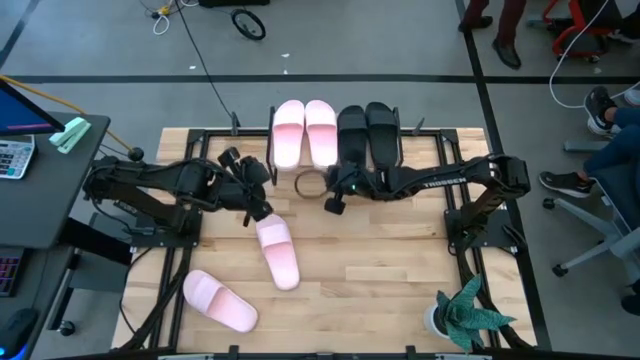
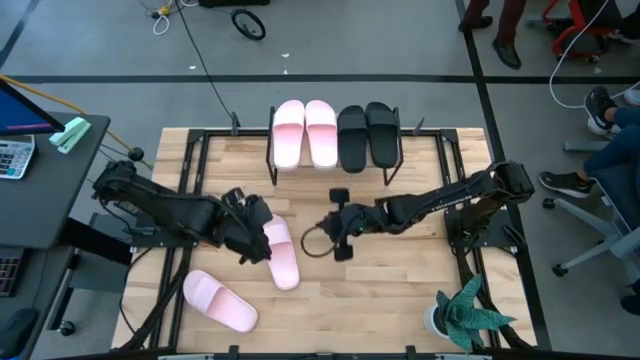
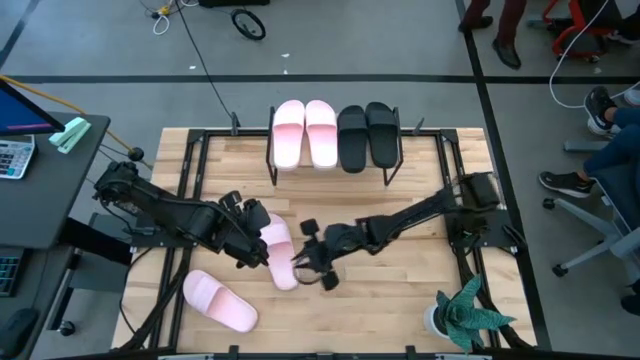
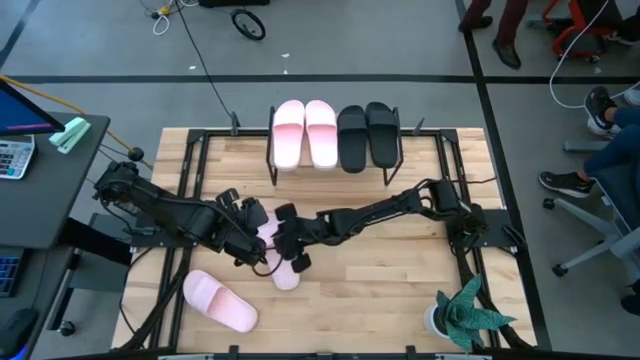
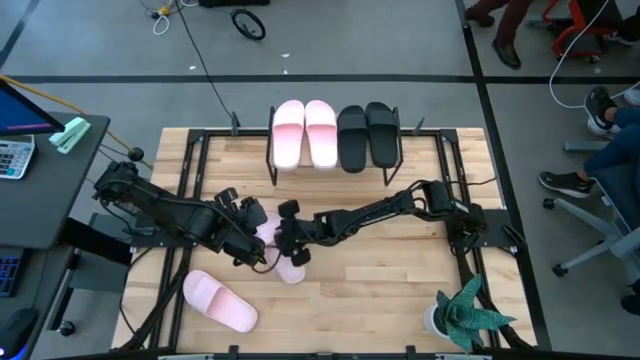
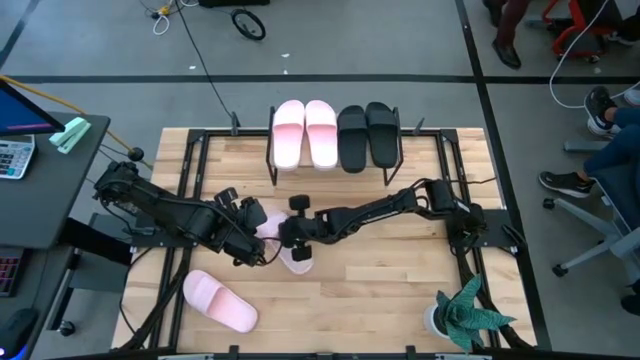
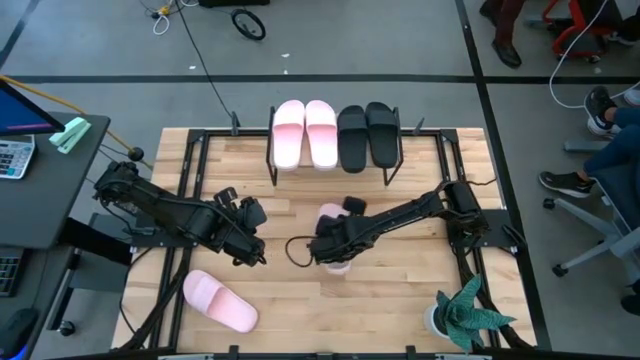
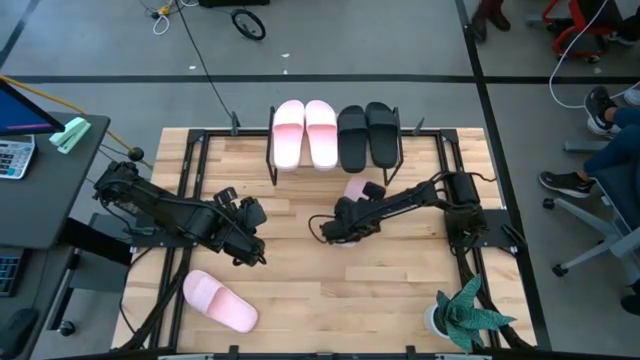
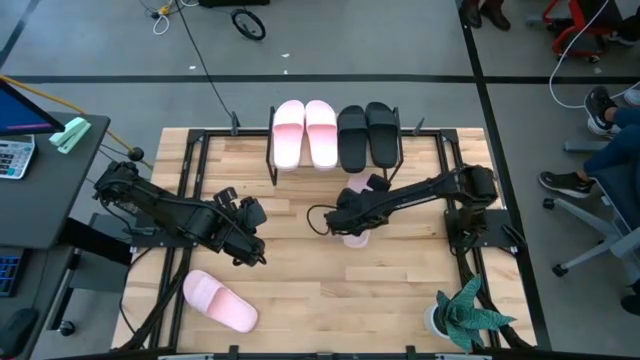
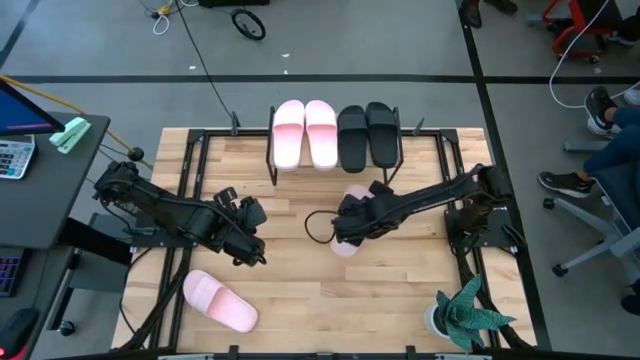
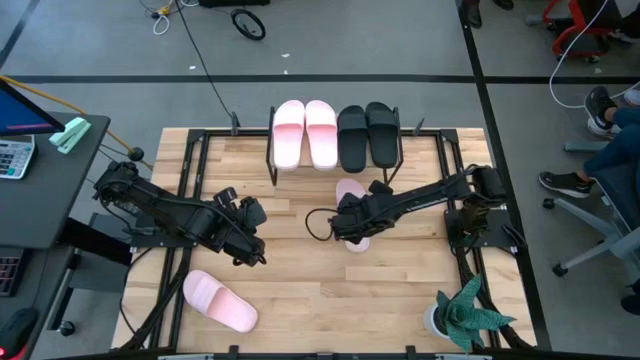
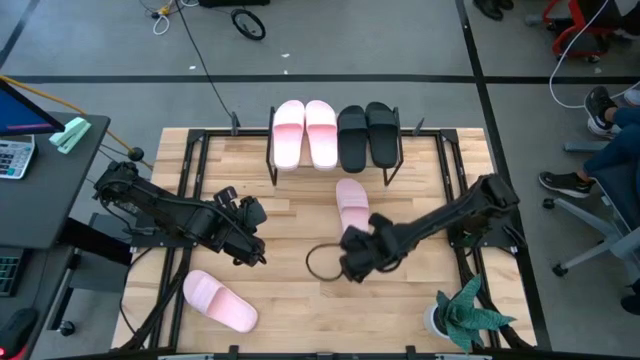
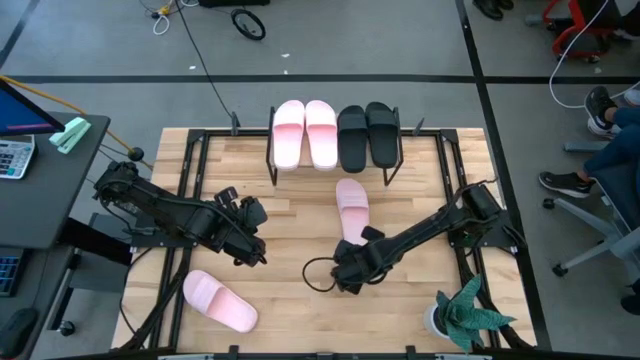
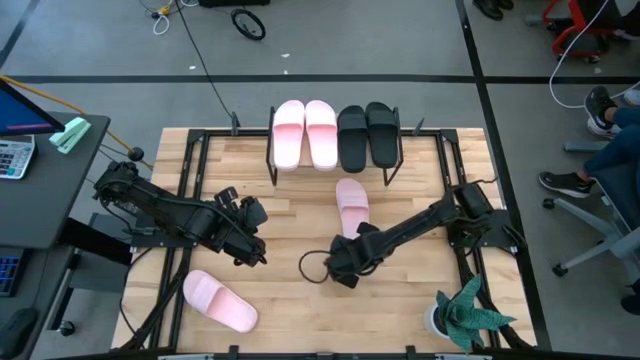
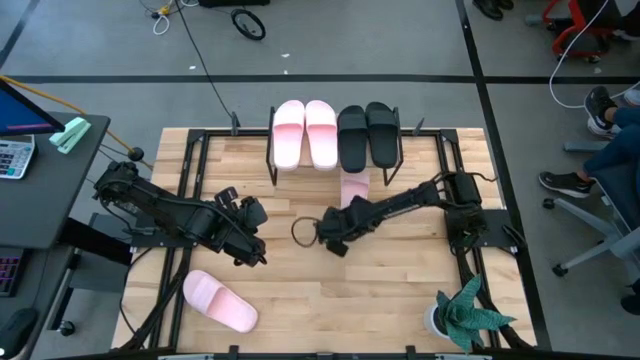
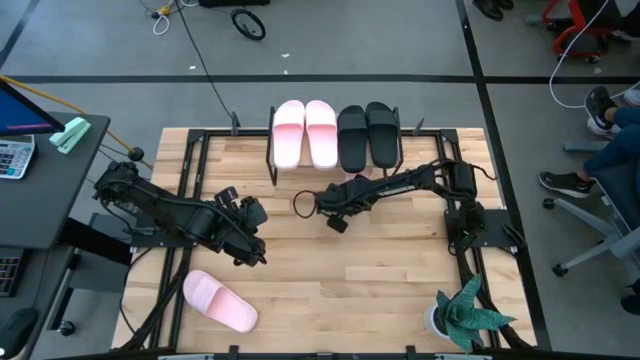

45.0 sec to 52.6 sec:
Task: Pick and place slides into the shelf
Put the top pink slide under the shelf

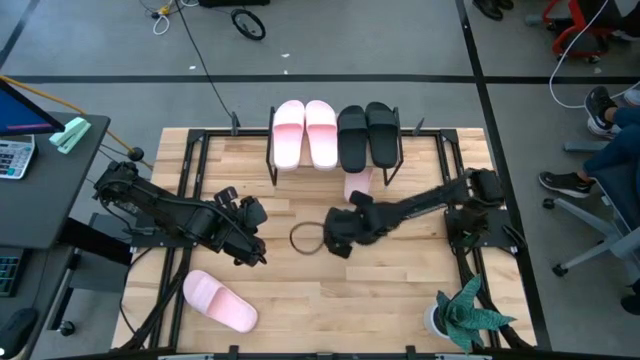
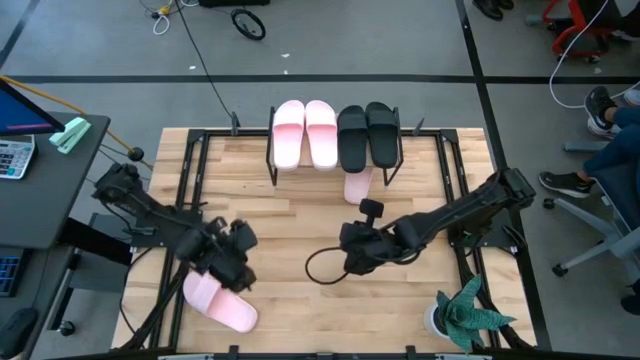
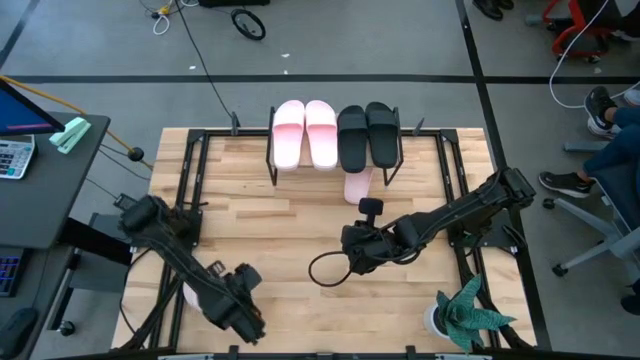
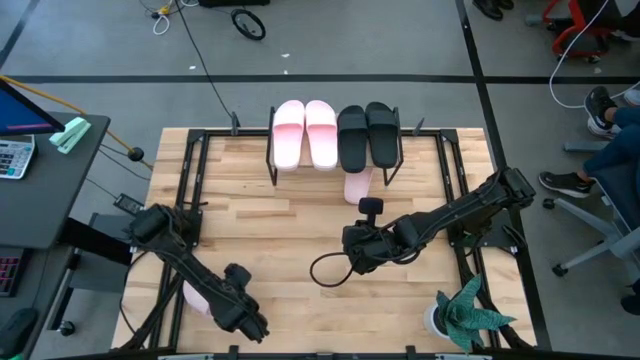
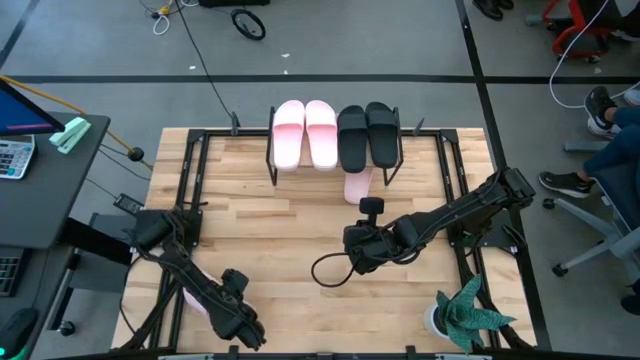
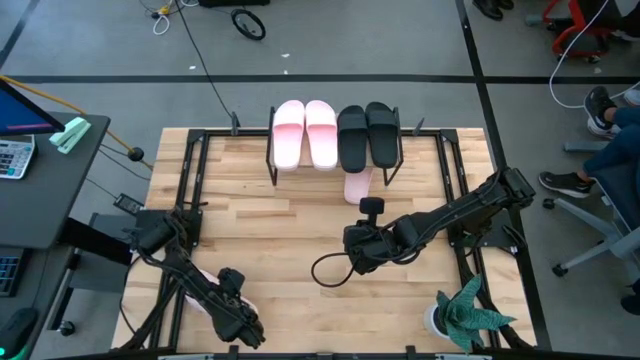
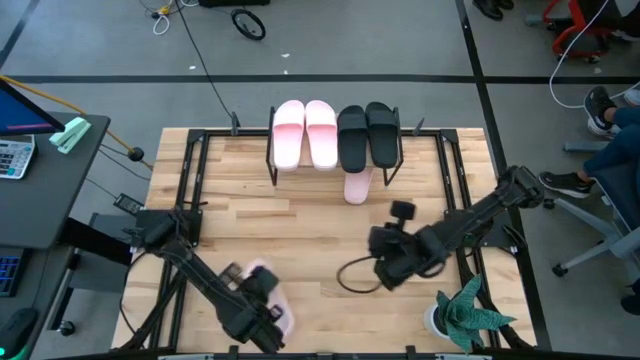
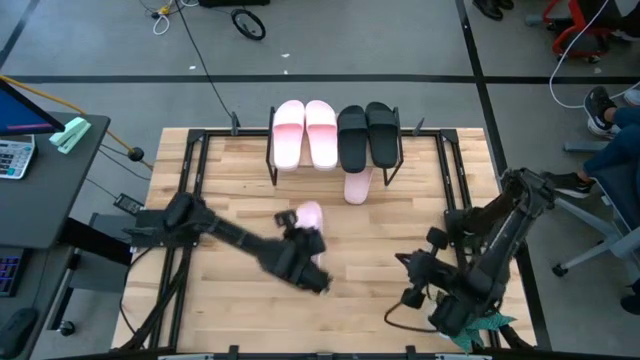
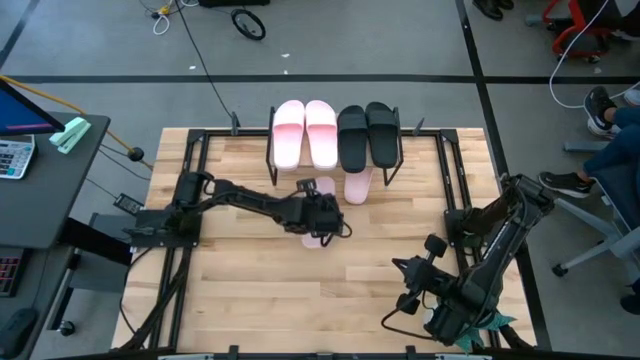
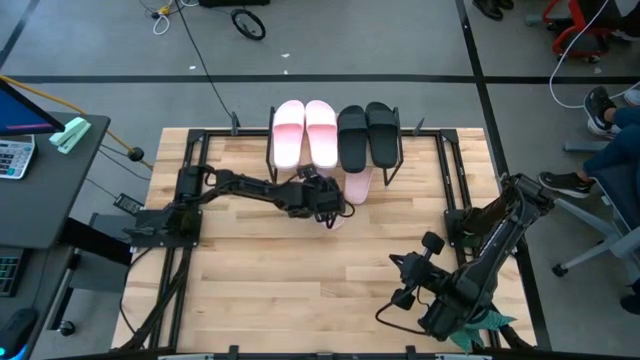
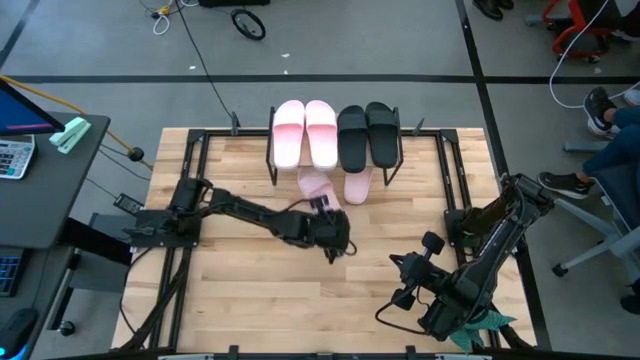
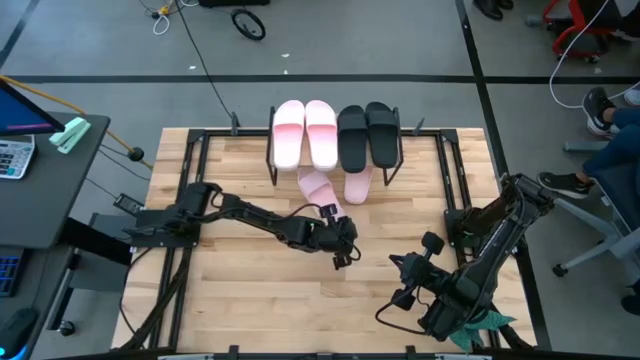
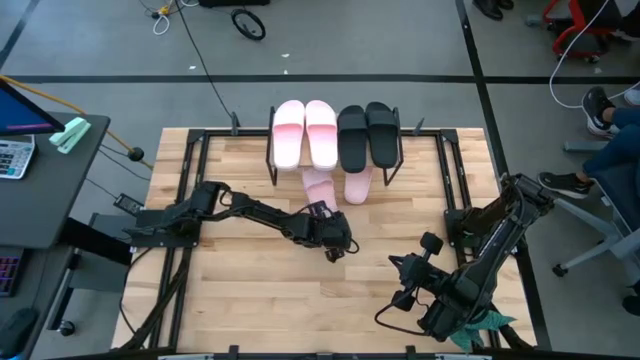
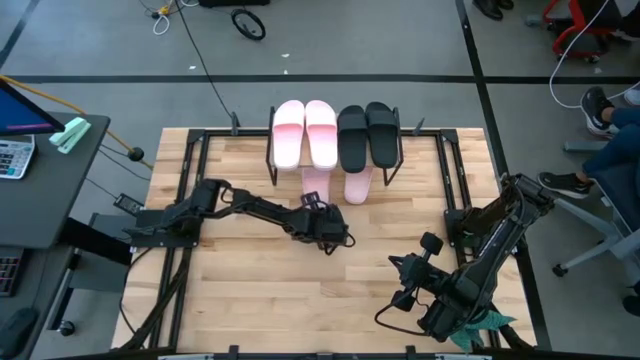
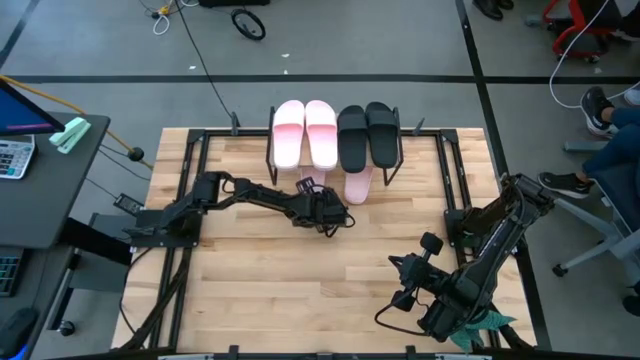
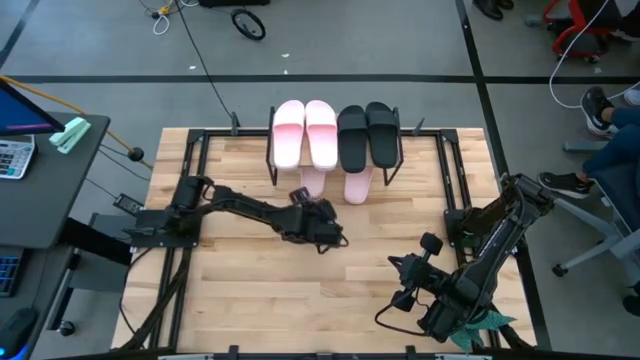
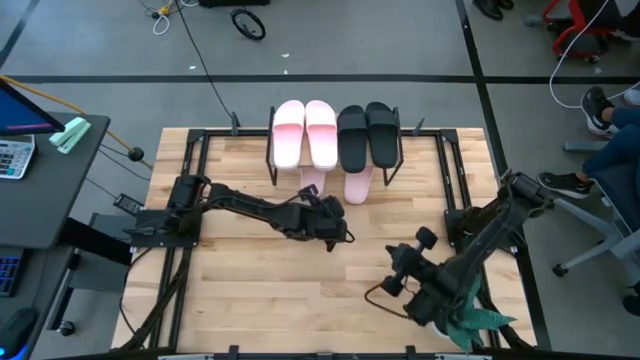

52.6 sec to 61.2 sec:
Put the pink slide under the shelf

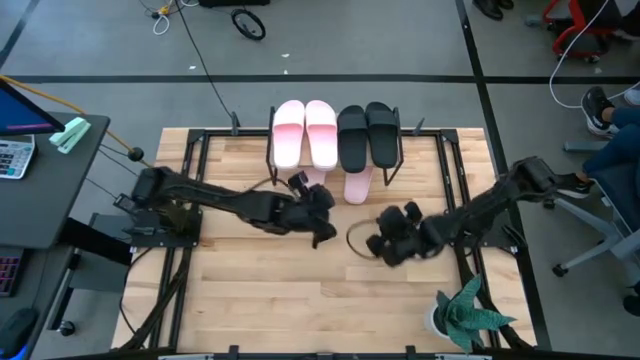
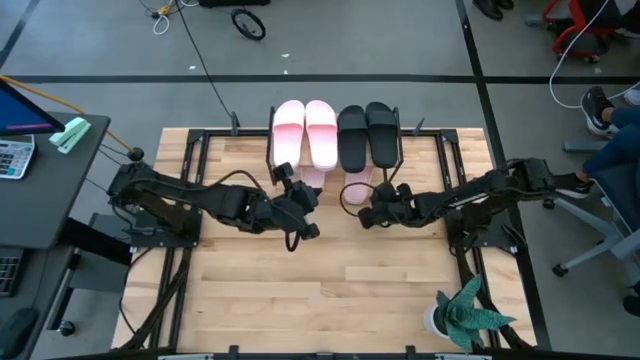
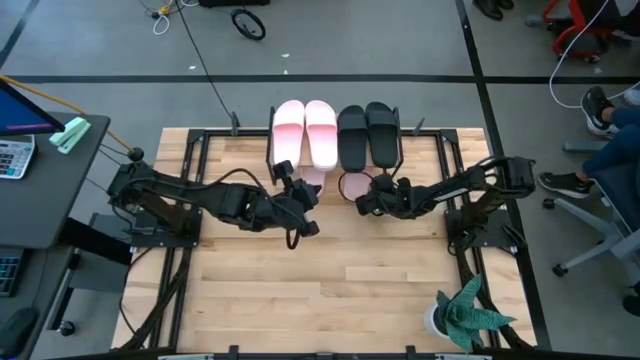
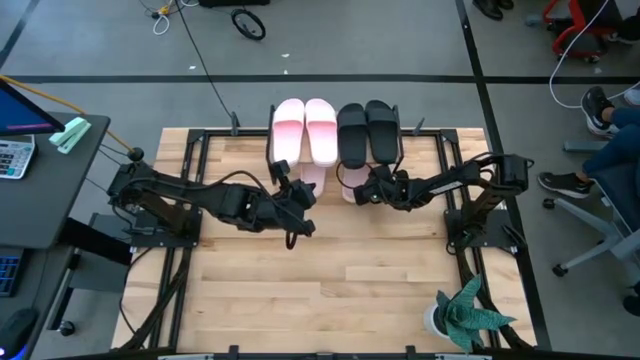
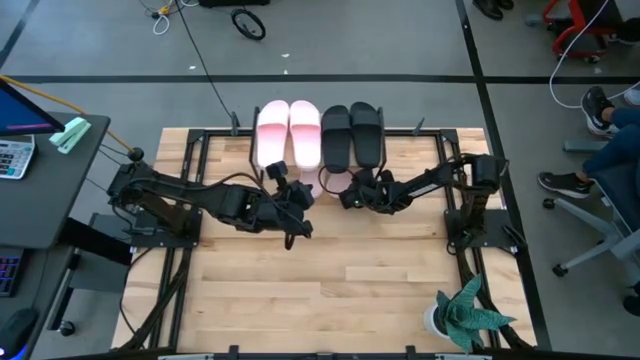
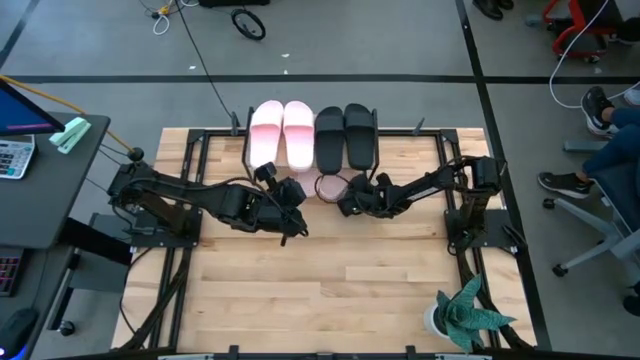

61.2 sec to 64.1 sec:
Adjust the pink slide under the shelf

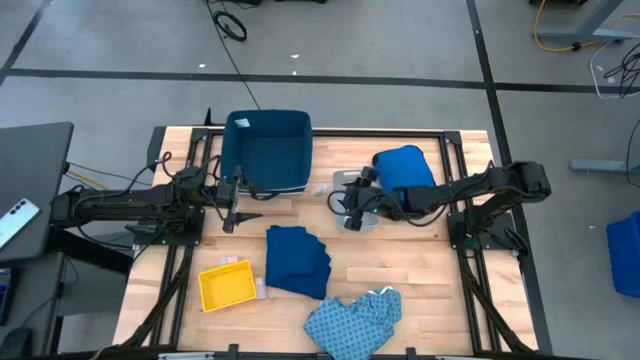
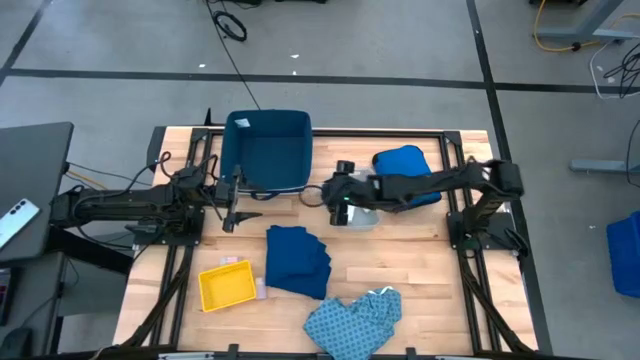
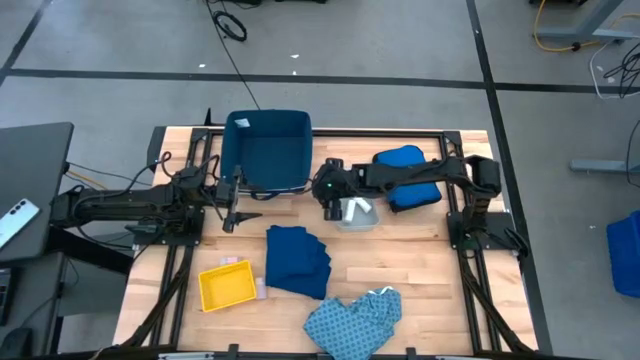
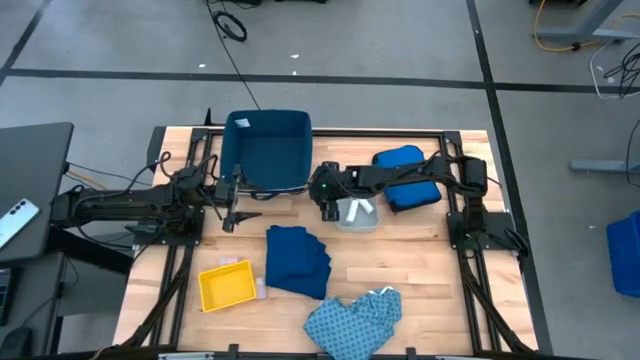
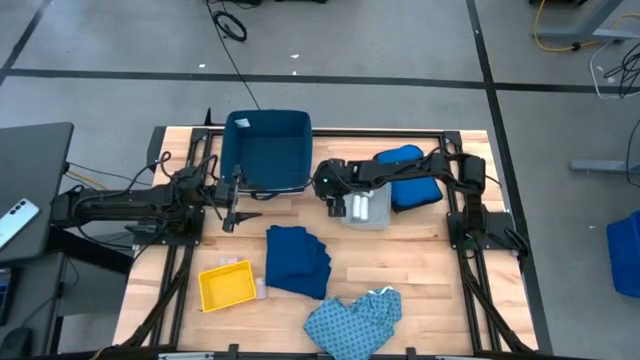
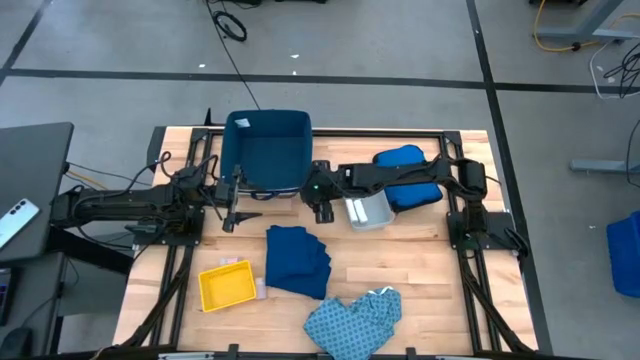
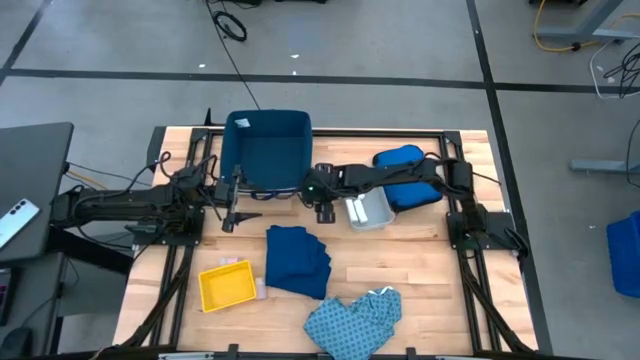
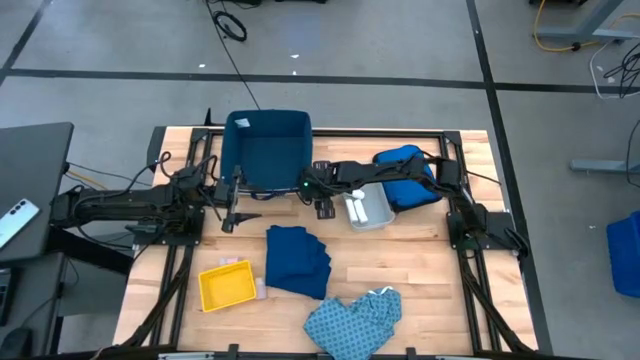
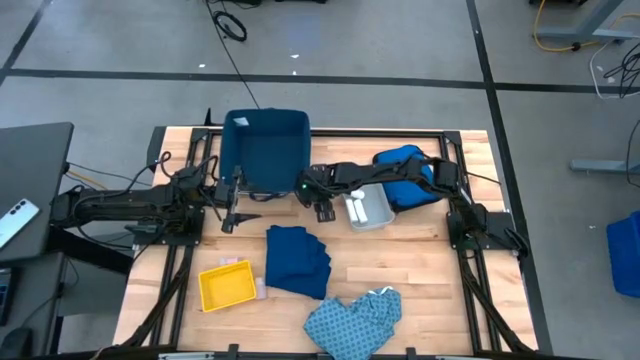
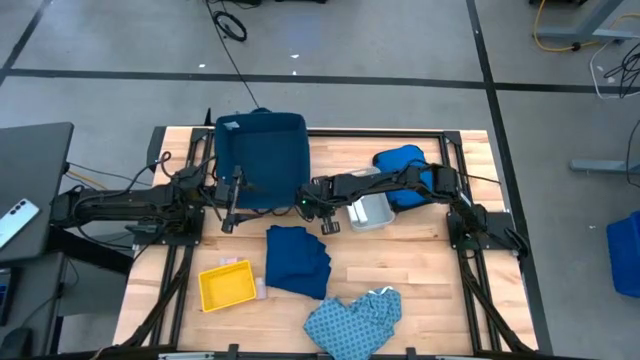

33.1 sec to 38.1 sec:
Task: Pick & place medical supplies in basket/bin
Put the top right transparent pill bottle into the yellow bin
